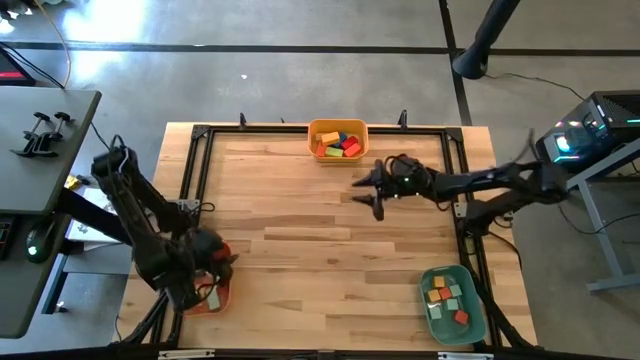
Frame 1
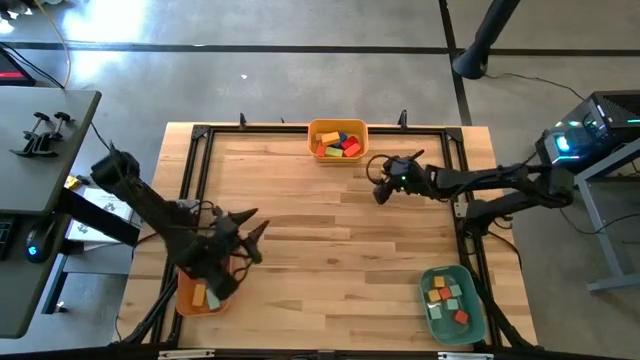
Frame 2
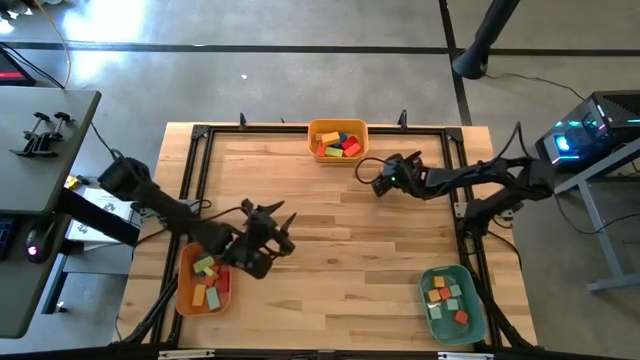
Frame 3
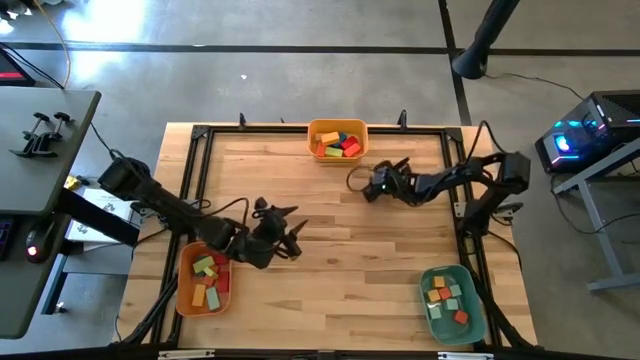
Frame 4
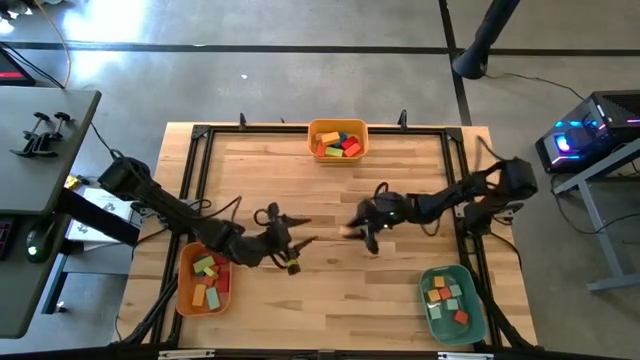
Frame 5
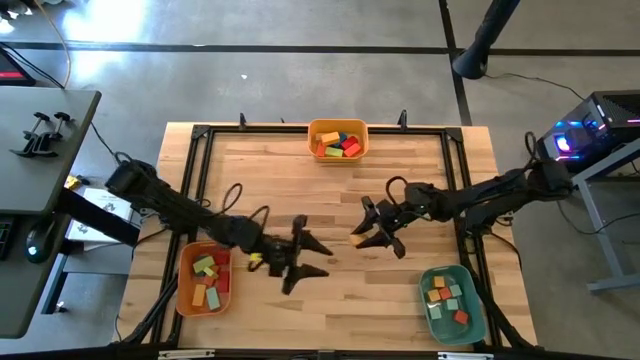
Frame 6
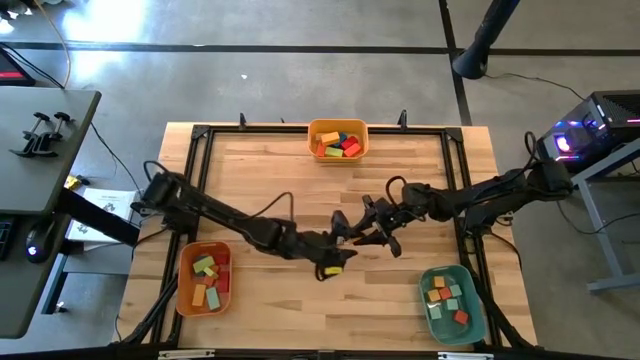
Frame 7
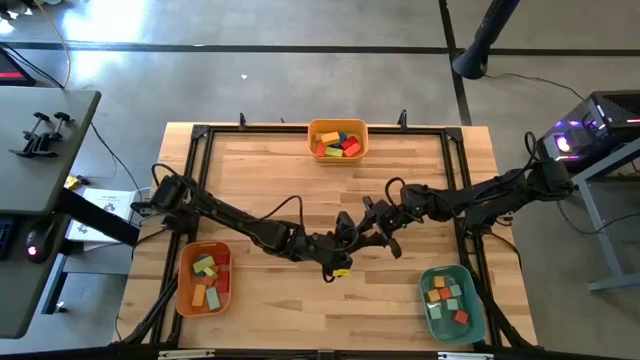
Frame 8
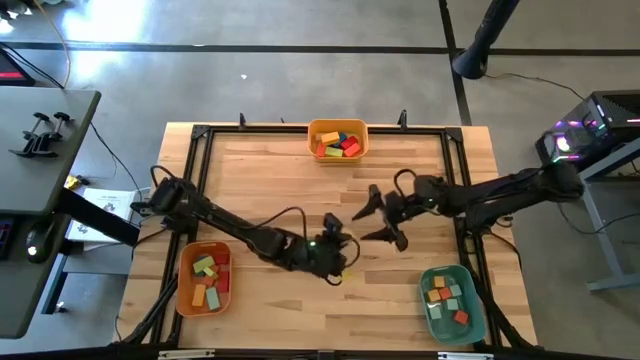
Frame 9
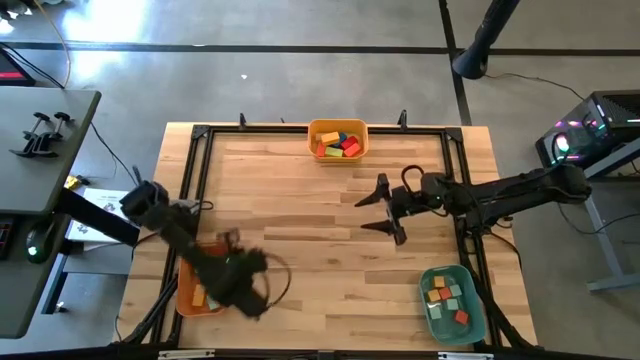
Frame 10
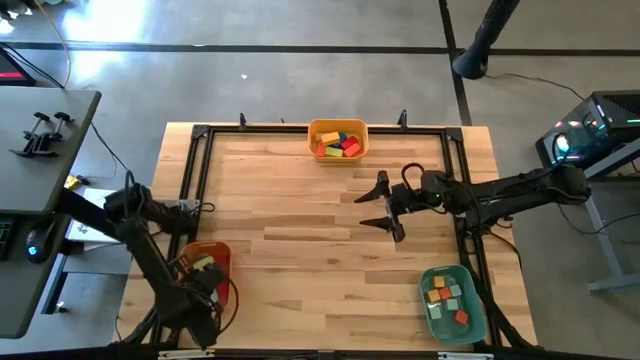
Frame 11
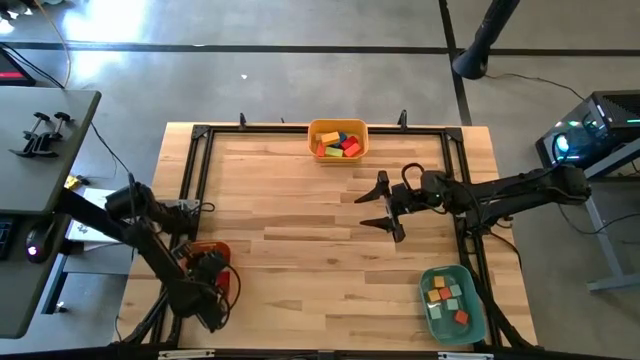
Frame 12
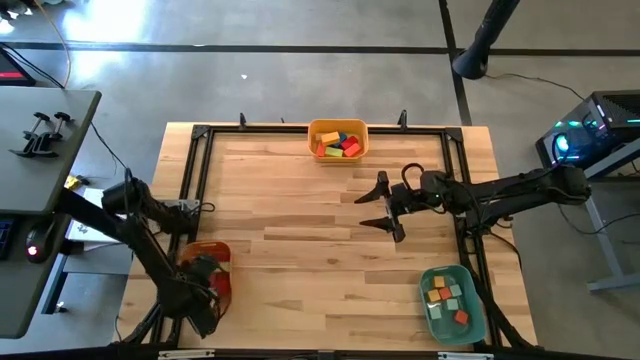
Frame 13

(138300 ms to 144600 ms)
Task: Sort blocks by size
Put the yellow narrow rectangular block into the orange bin

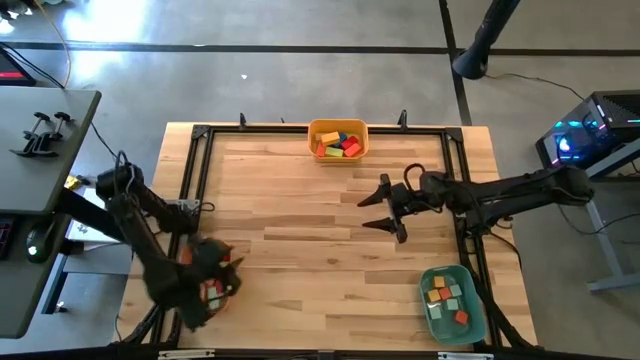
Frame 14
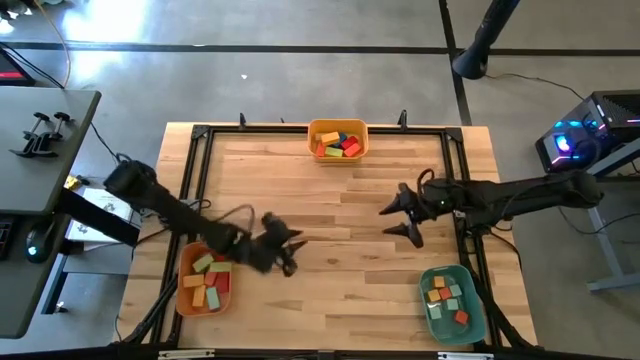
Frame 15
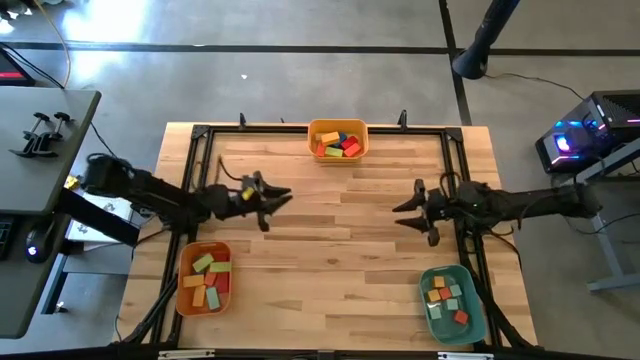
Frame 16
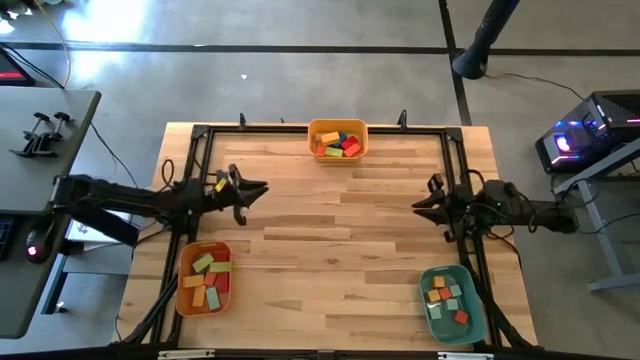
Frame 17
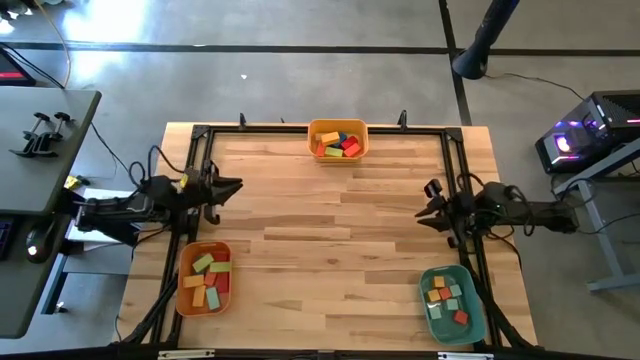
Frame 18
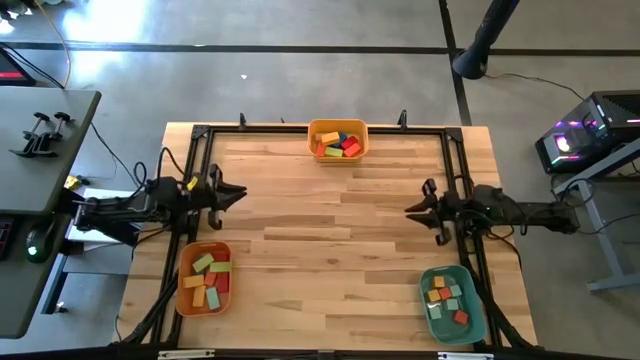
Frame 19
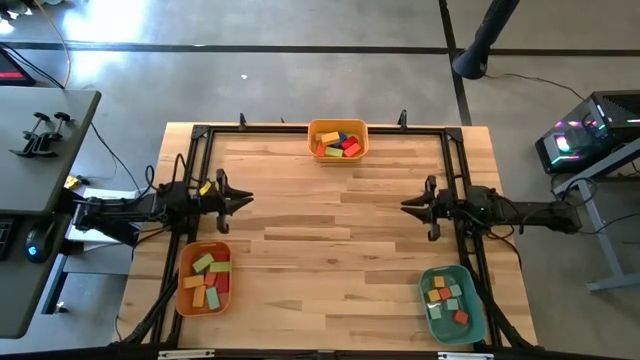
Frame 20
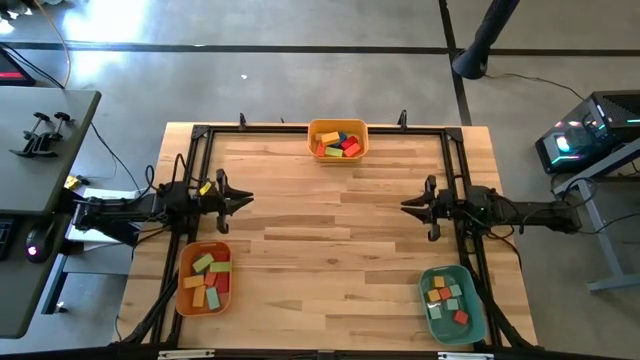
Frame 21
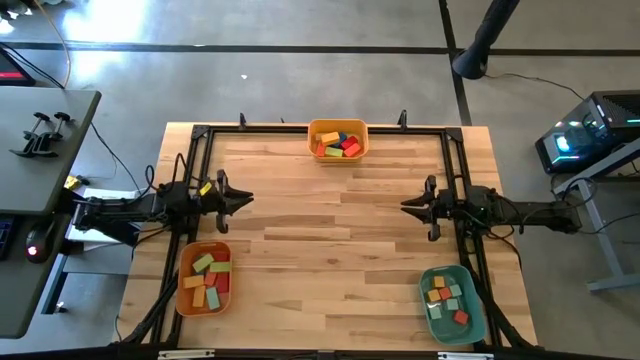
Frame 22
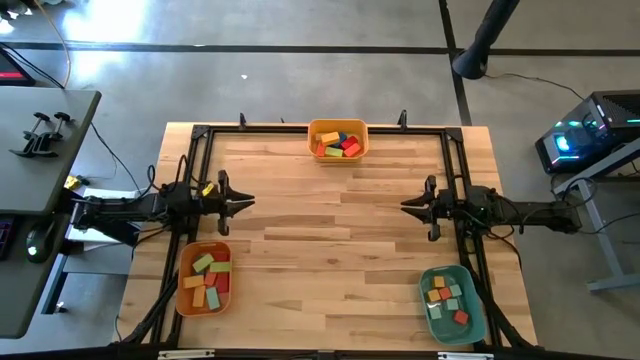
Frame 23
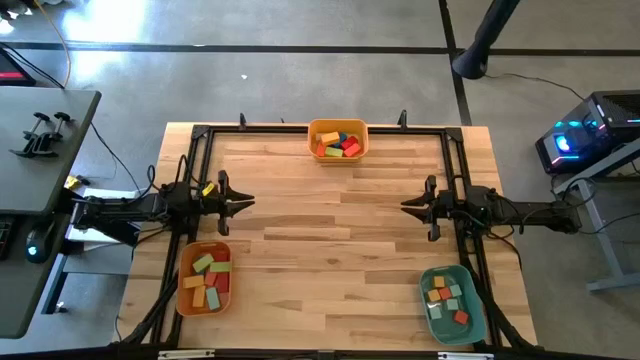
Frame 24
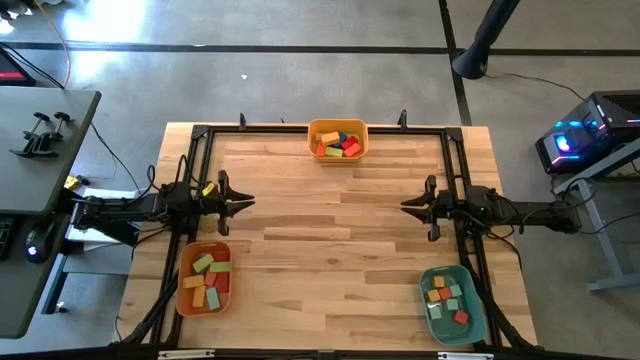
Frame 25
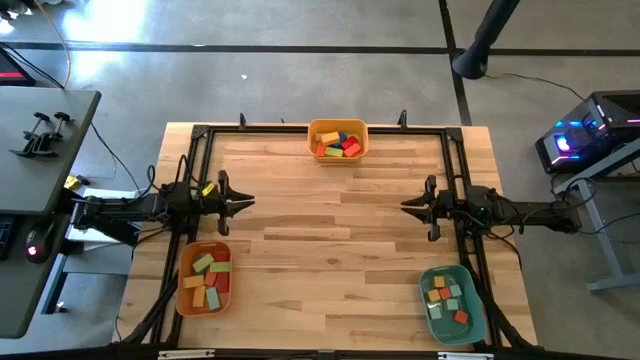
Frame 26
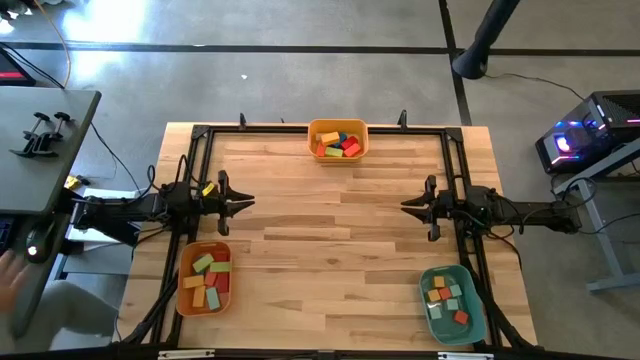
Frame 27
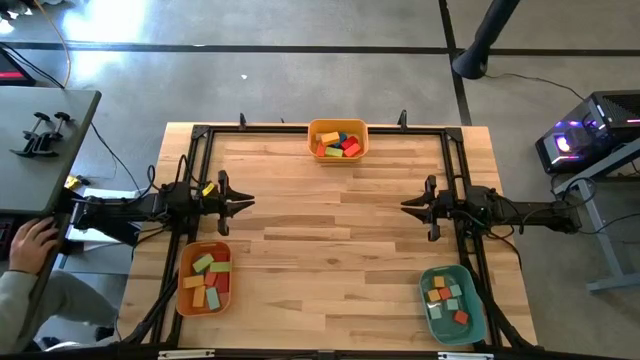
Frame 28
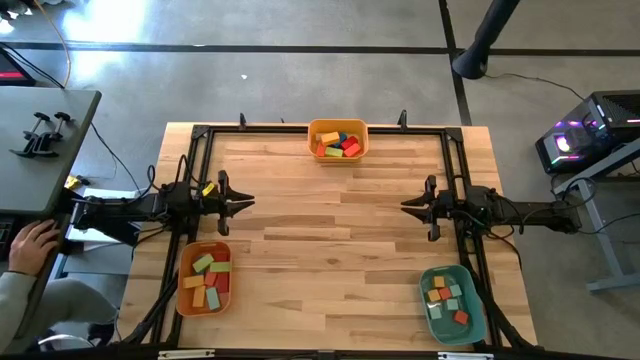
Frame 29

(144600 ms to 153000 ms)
Return to Home Position

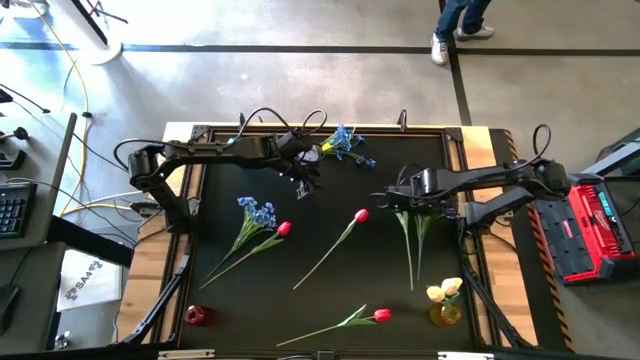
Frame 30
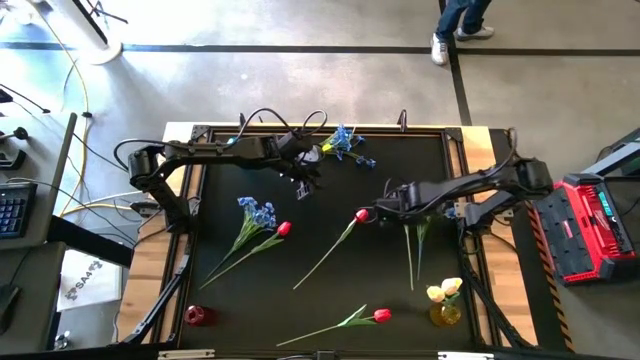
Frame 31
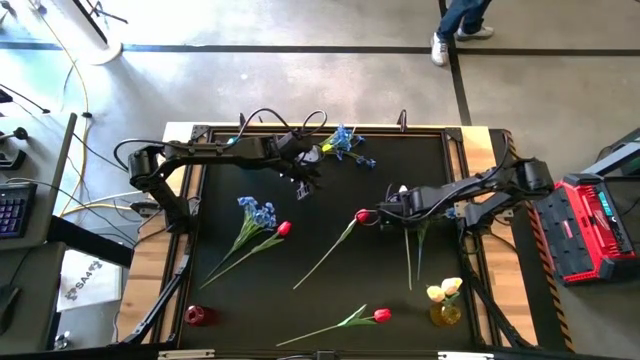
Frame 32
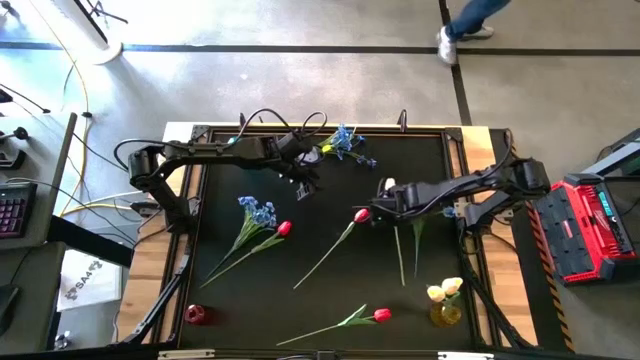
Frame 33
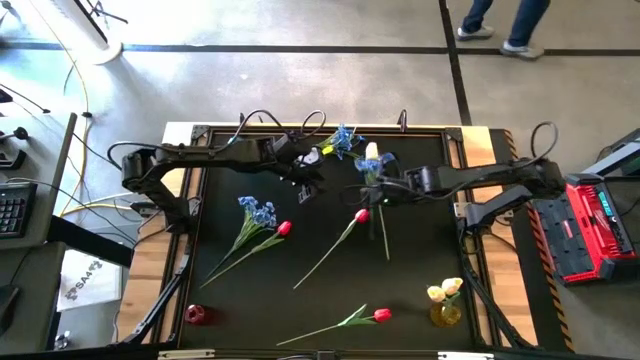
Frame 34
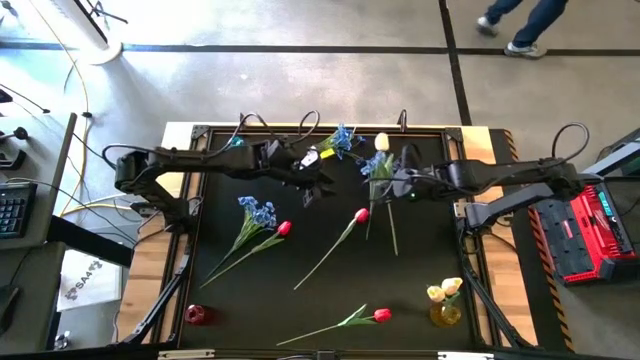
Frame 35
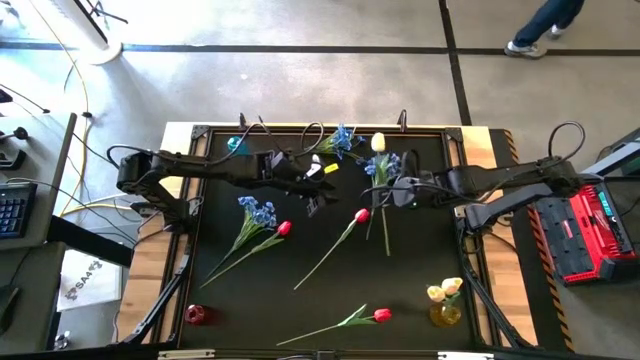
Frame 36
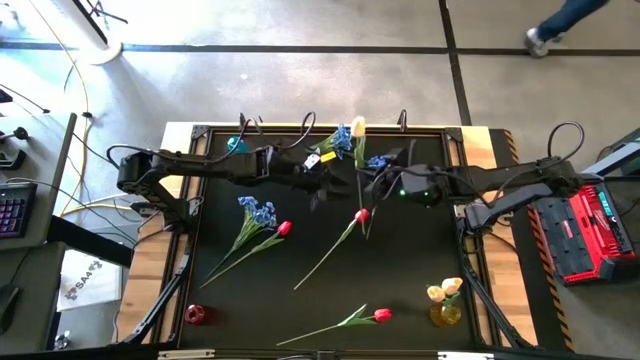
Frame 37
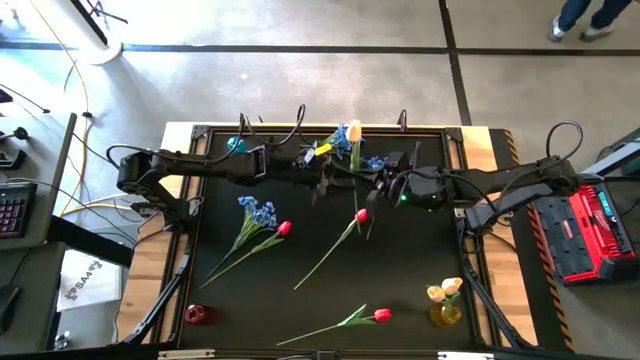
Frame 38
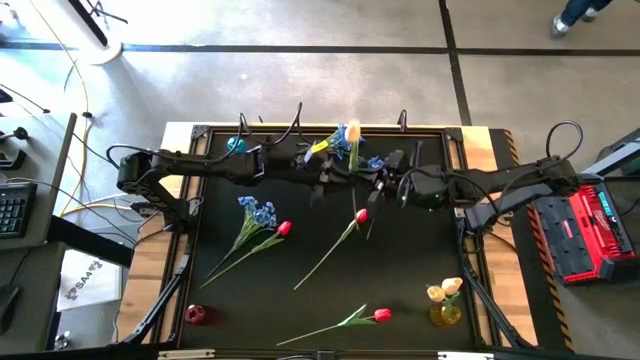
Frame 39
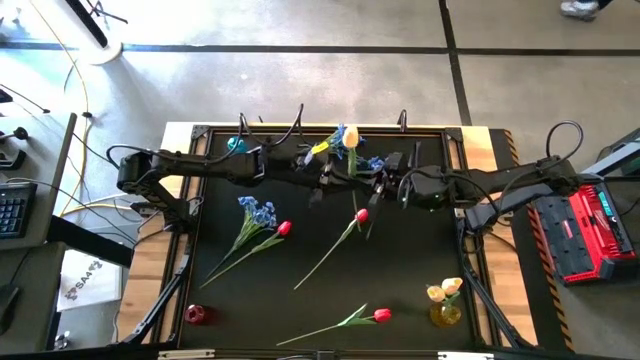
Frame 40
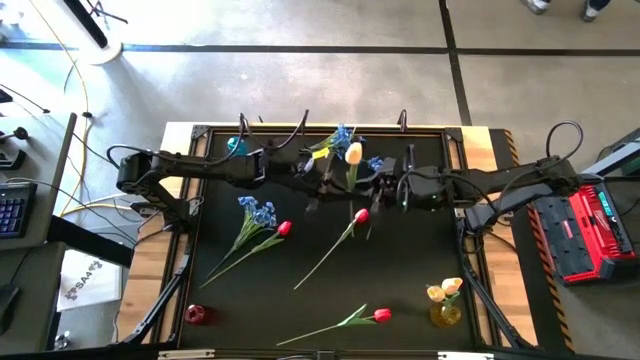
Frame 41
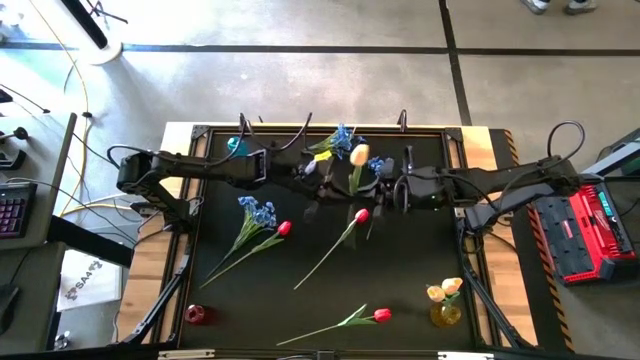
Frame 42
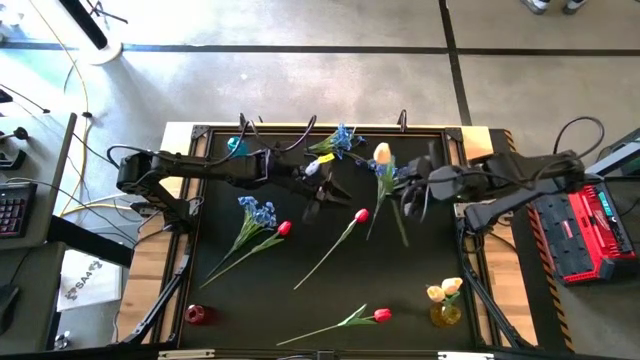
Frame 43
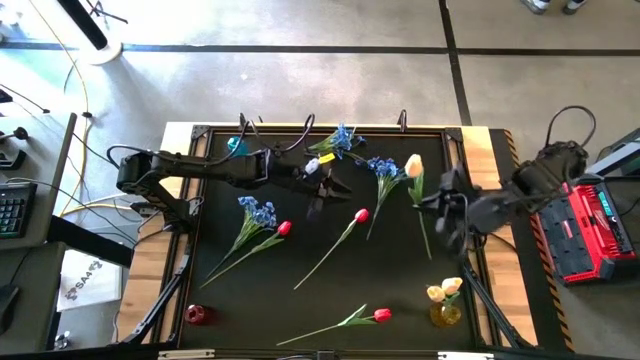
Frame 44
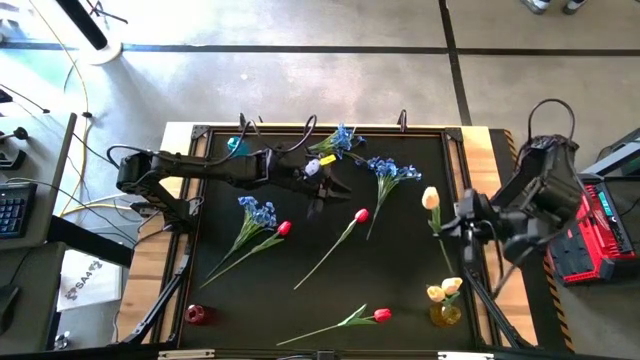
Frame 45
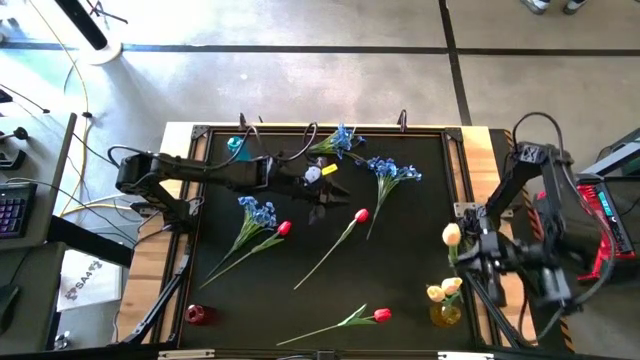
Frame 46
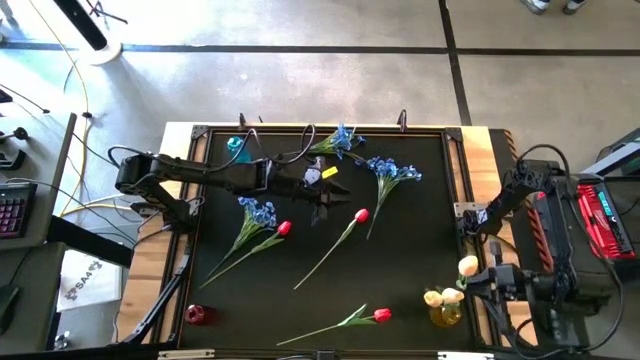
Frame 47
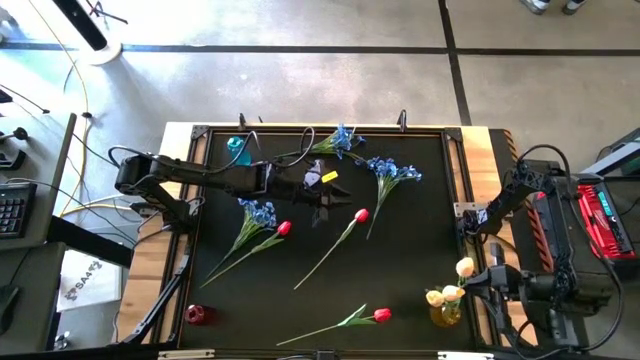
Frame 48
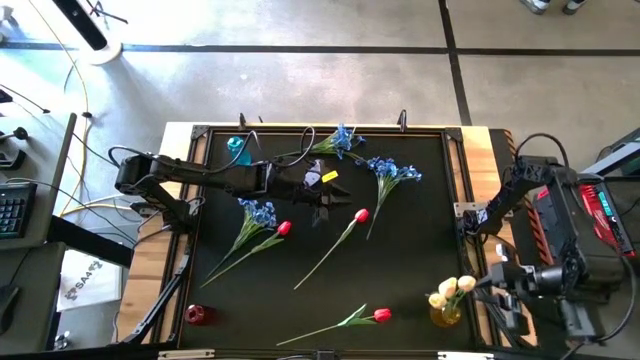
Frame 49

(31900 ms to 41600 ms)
Task: Sort flowers into vase by color
Put the light yellow tulip into the yellow vase
